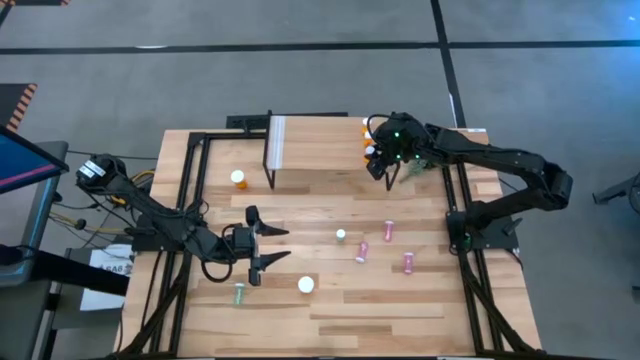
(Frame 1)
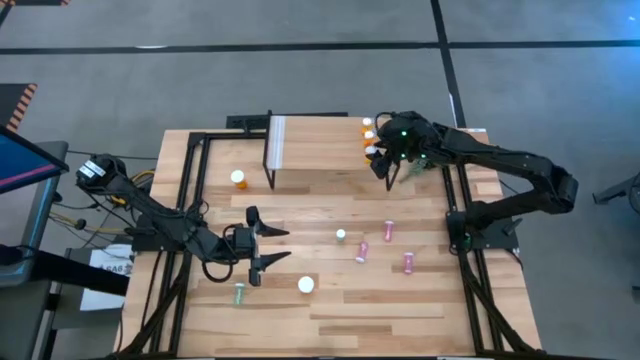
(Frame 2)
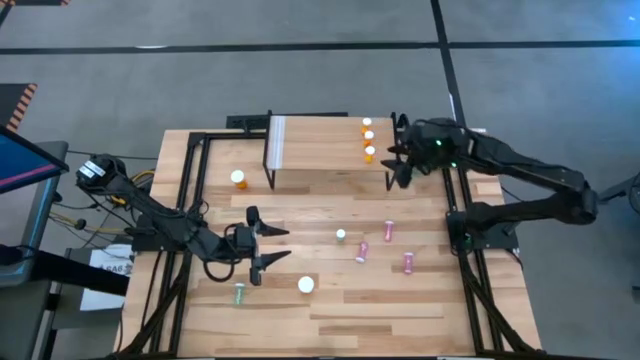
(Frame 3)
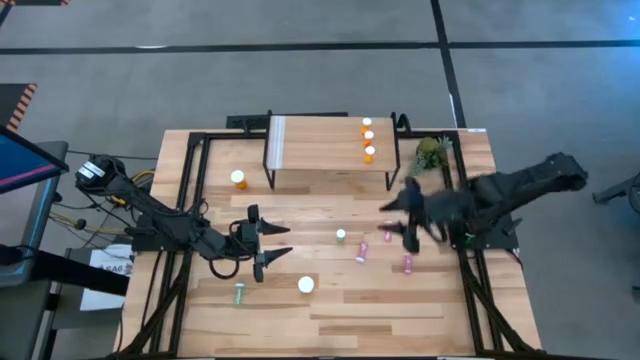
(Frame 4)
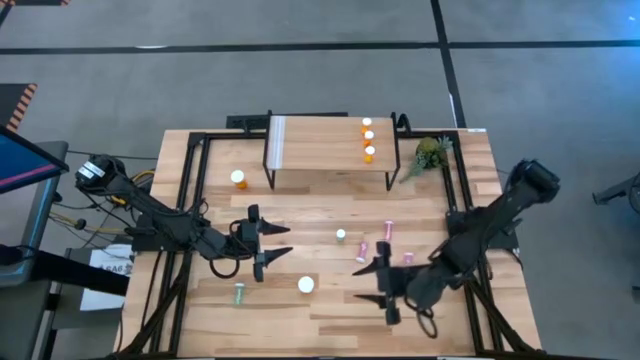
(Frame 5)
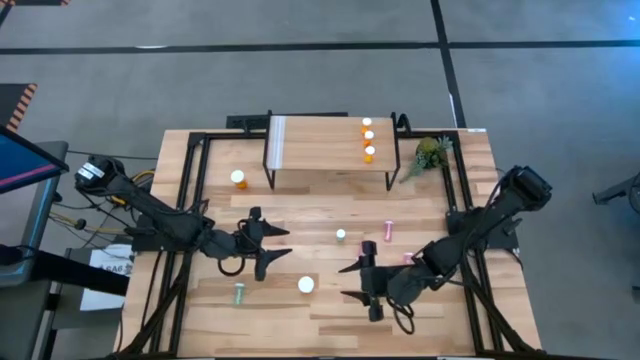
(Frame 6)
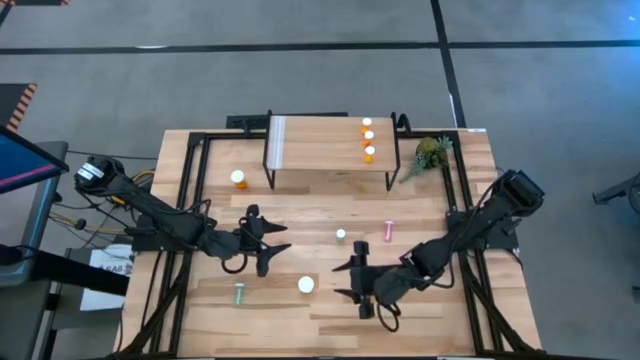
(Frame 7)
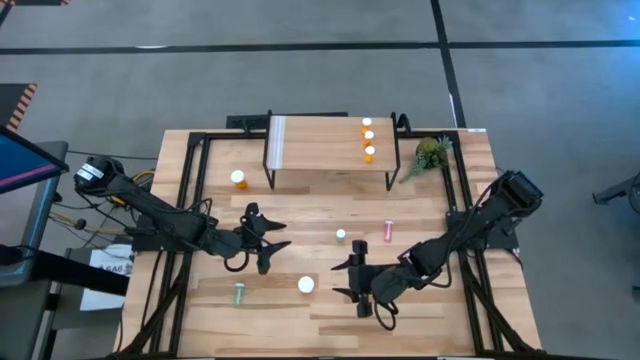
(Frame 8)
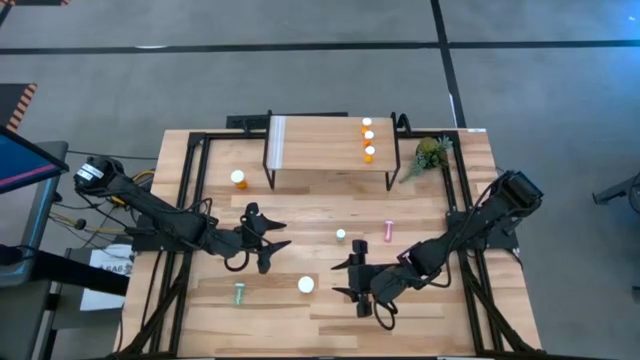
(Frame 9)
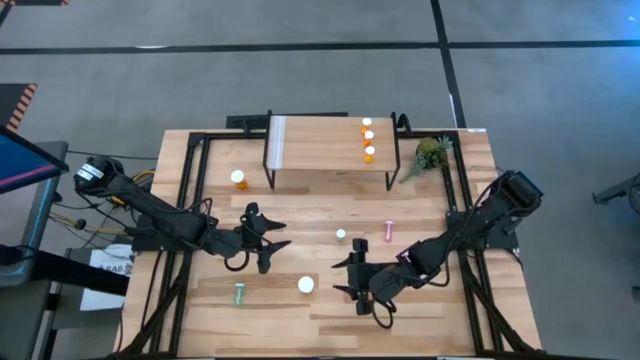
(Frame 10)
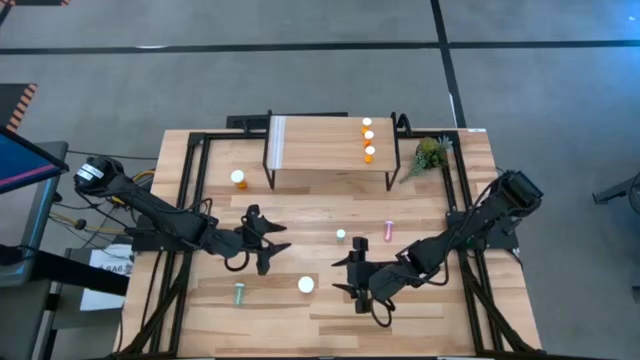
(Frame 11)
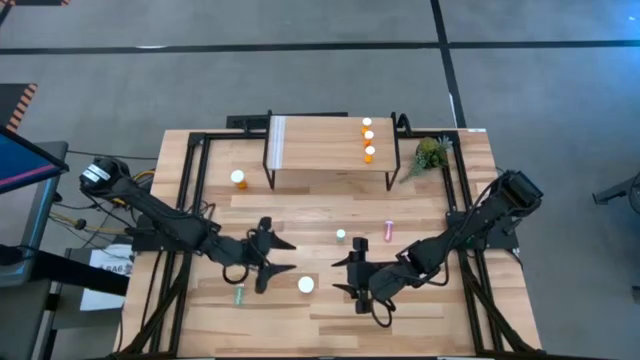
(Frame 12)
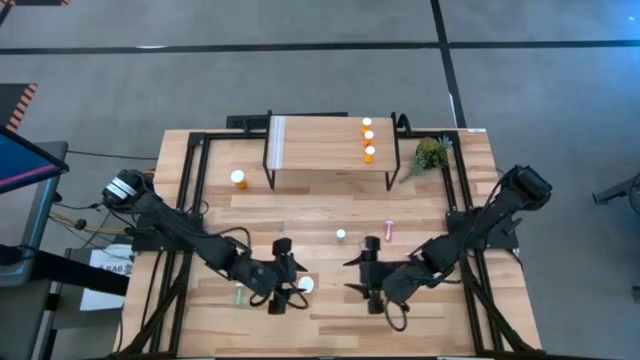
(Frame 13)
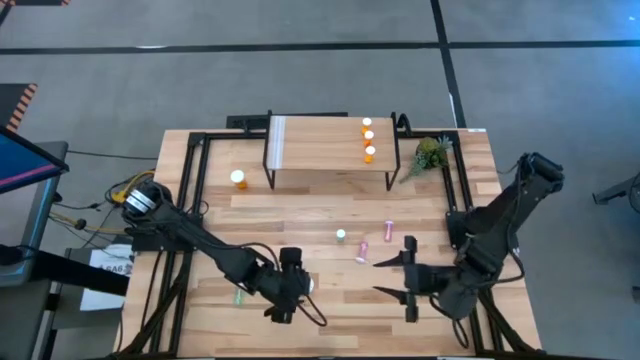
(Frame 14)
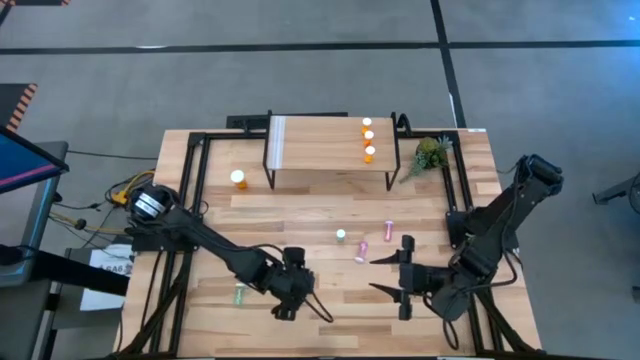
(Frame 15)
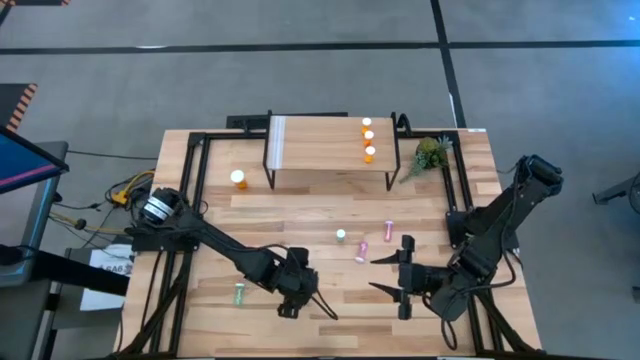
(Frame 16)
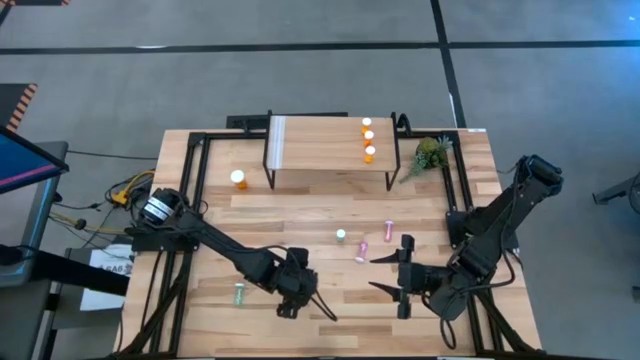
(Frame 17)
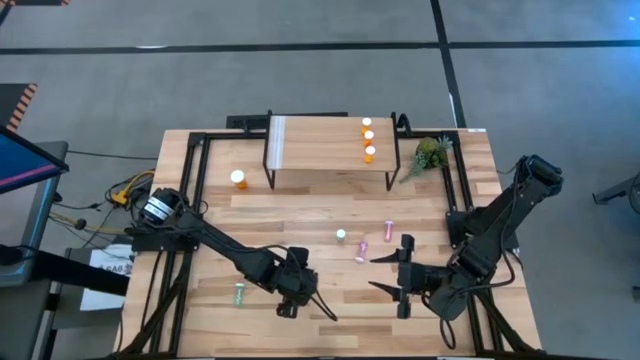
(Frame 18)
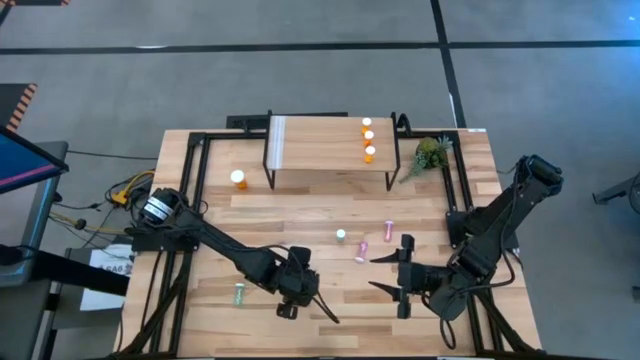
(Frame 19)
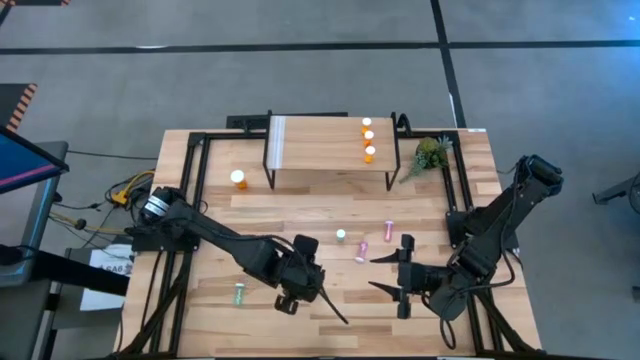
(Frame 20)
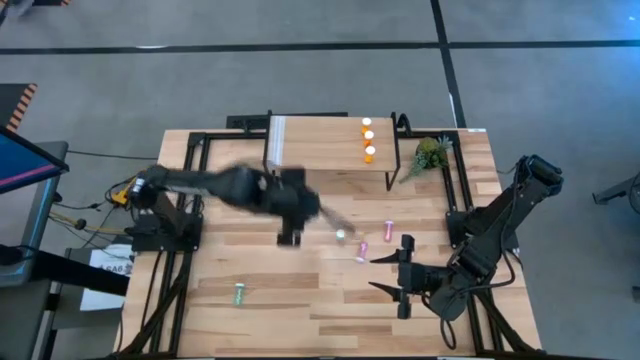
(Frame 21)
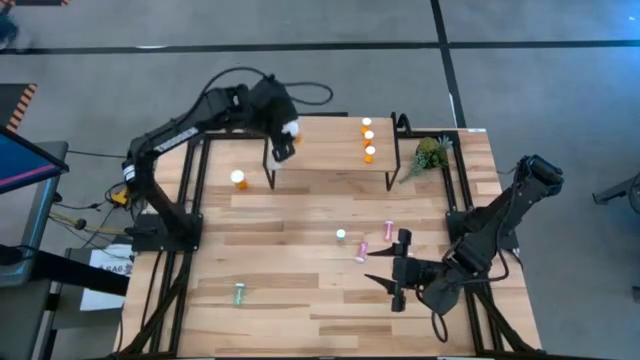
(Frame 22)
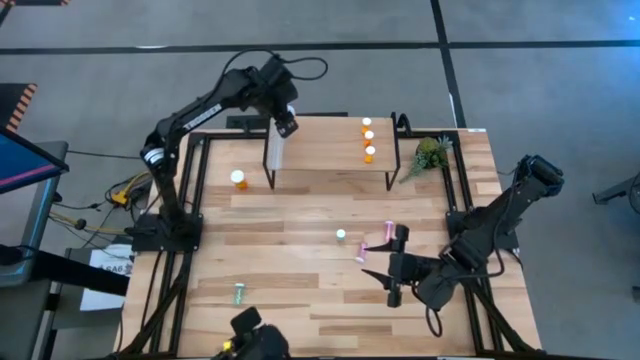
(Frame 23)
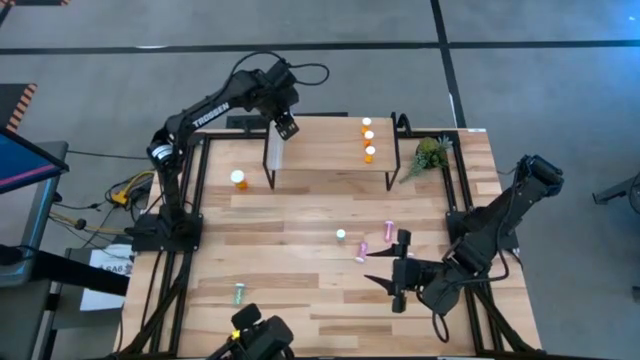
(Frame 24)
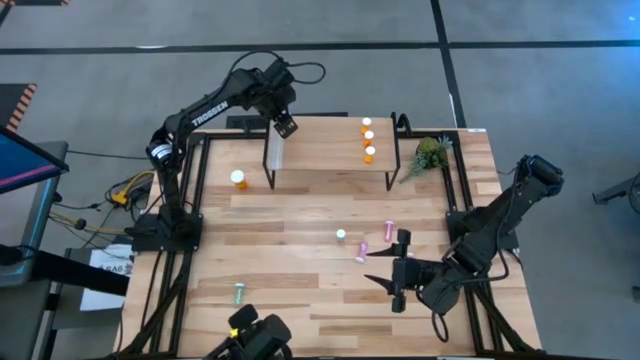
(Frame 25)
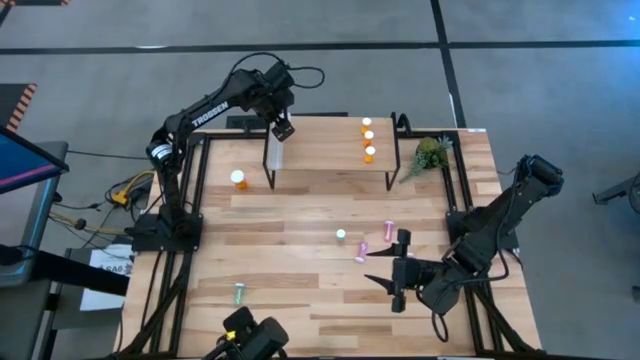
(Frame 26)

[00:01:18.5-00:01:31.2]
Task: Pick and place medicine bottles onto shelf by color
Put the bottom big orange pill bottle on the shelf

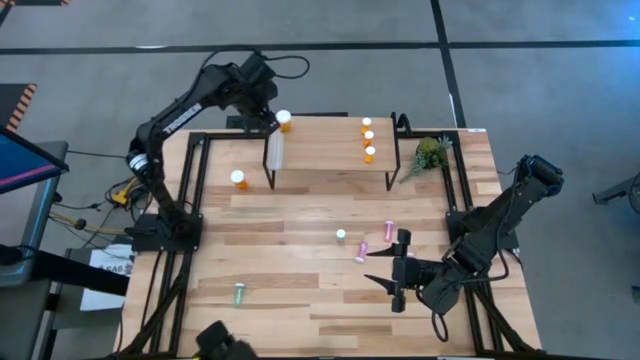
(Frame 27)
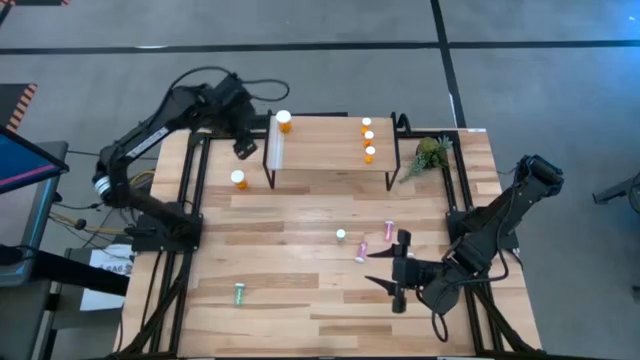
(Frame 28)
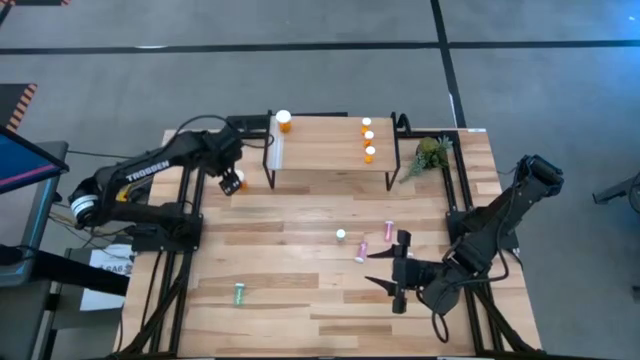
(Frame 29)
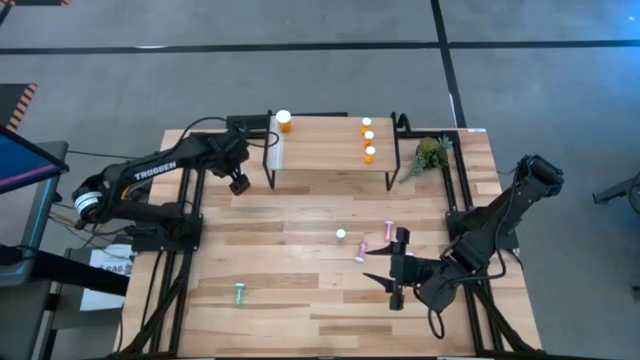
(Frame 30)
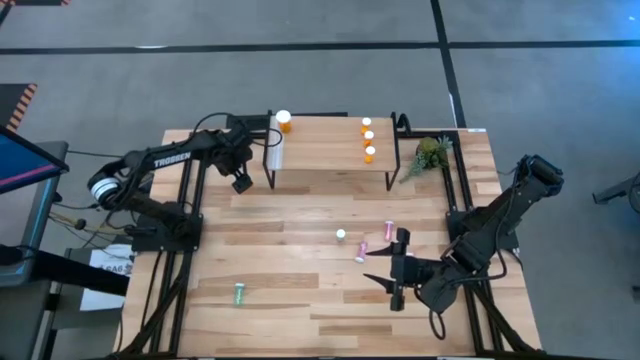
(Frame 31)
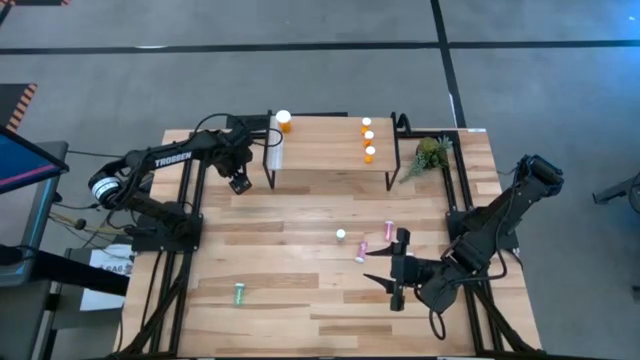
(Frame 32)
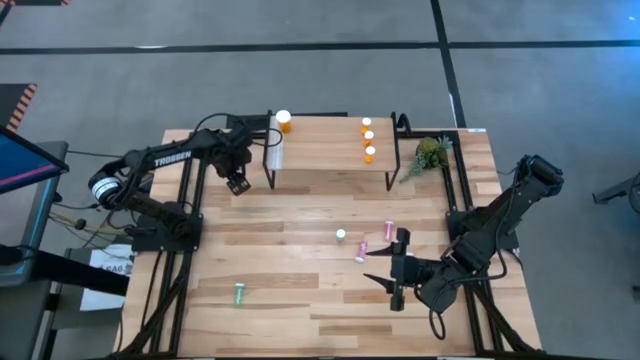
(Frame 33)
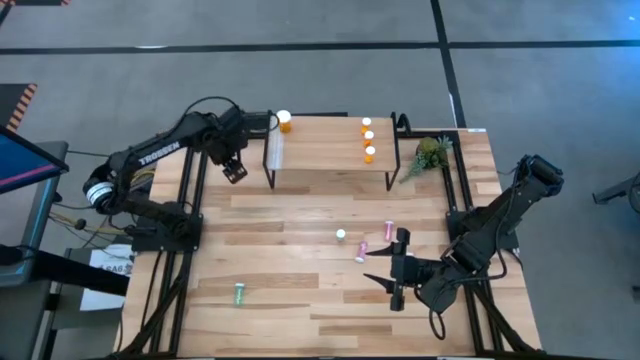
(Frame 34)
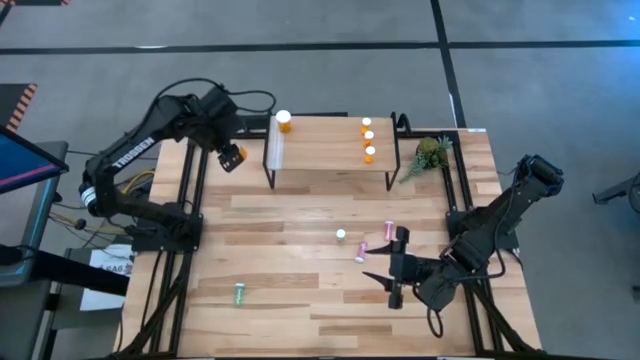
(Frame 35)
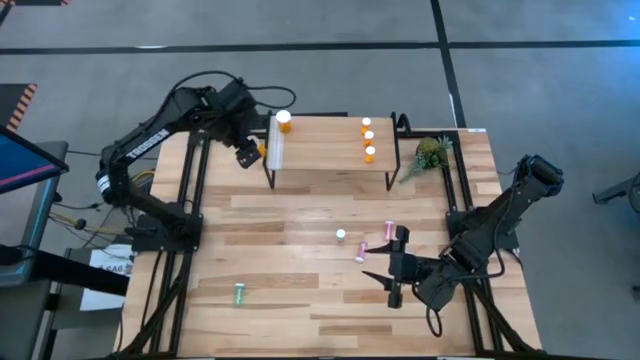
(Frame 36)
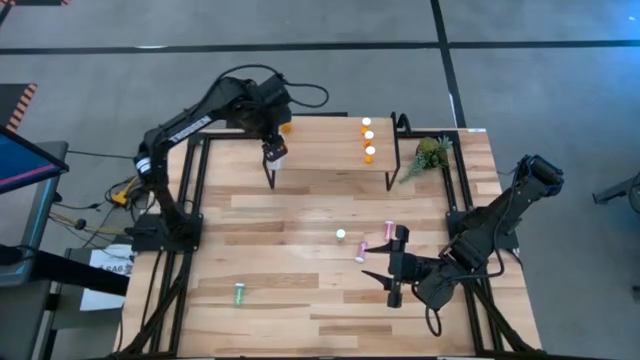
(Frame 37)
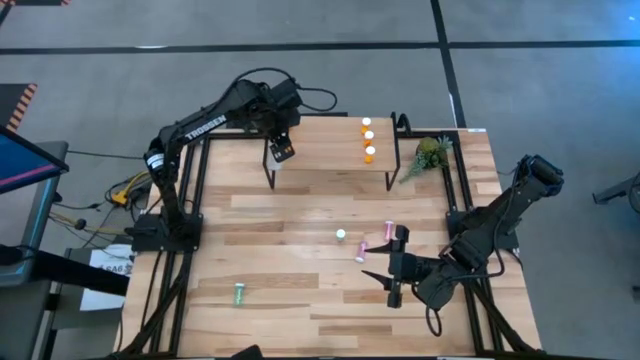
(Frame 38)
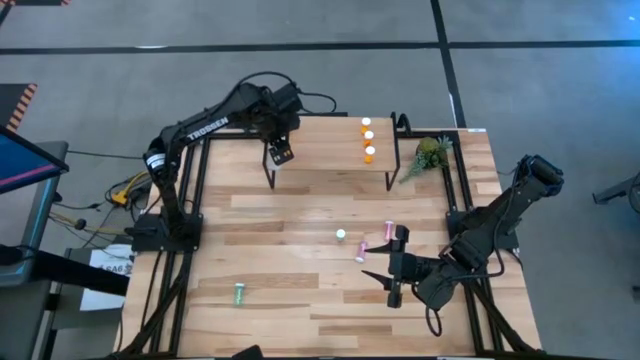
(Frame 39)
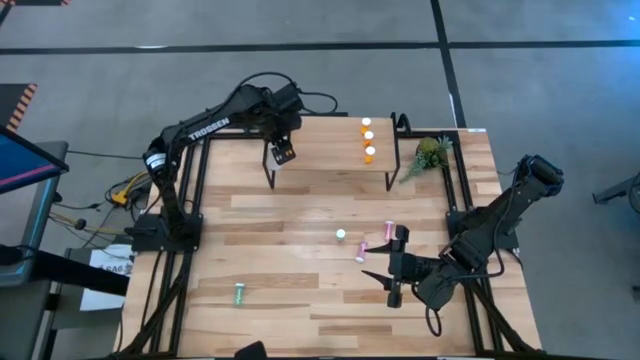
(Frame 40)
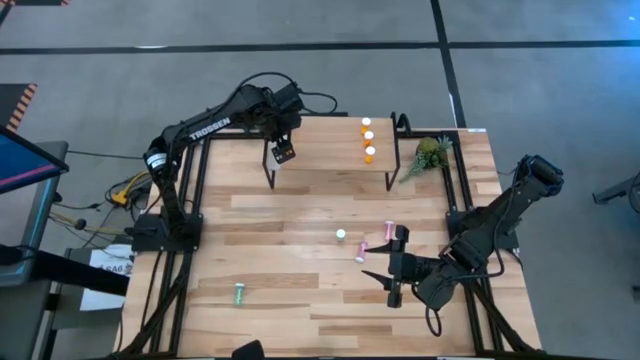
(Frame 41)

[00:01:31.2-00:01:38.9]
Put the big orange pill bottle on the shelf aligned with the big orange pill bottle

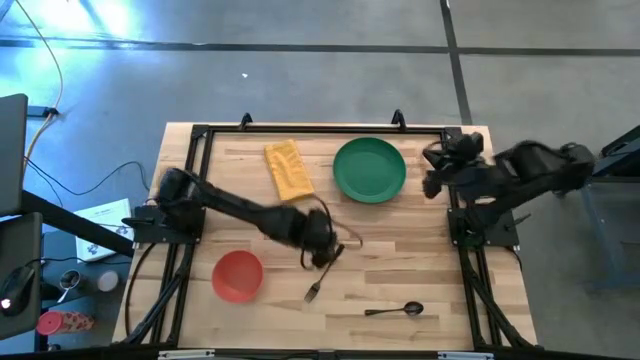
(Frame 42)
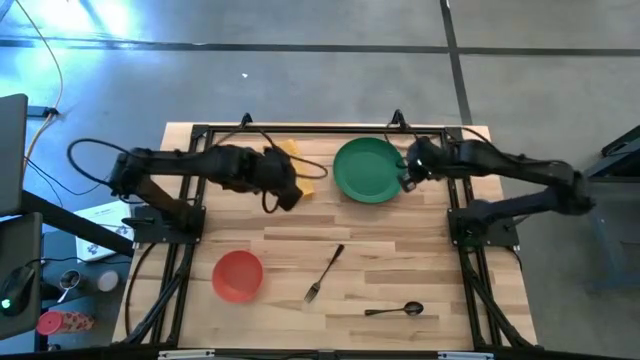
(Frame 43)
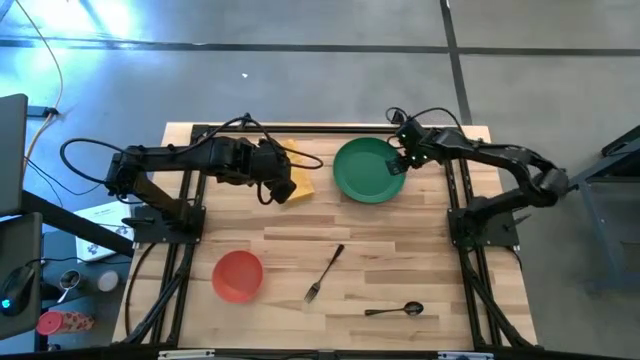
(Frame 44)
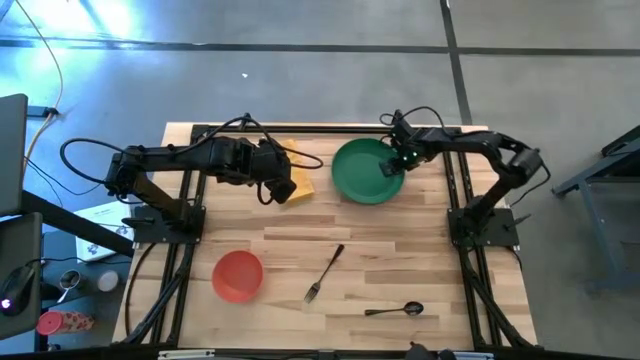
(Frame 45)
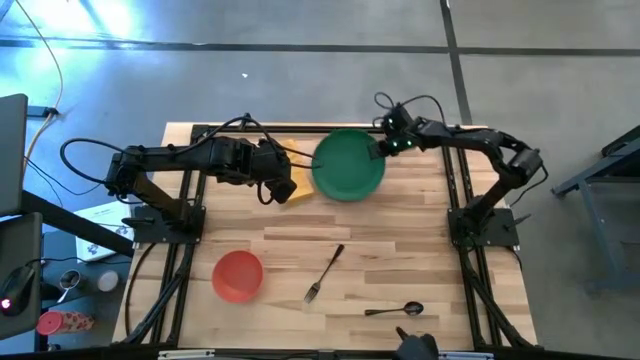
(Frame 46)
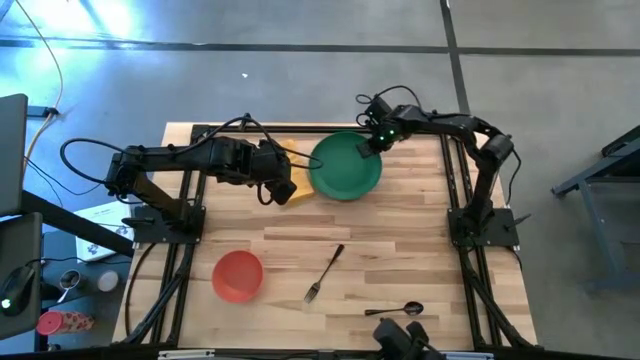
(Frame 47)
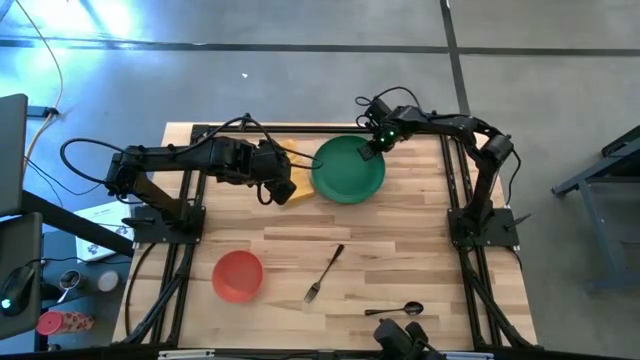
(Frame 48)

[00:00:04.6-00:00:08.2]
Task: Set table place
Adjust the green plate on the table
